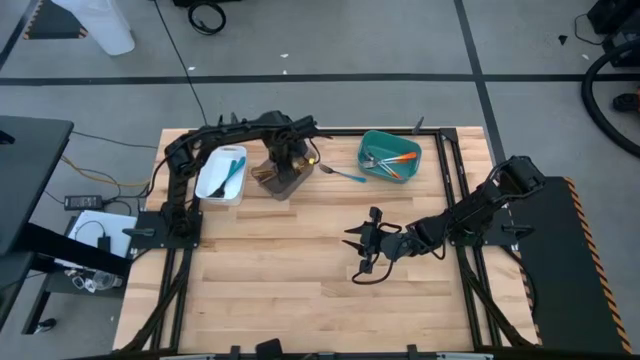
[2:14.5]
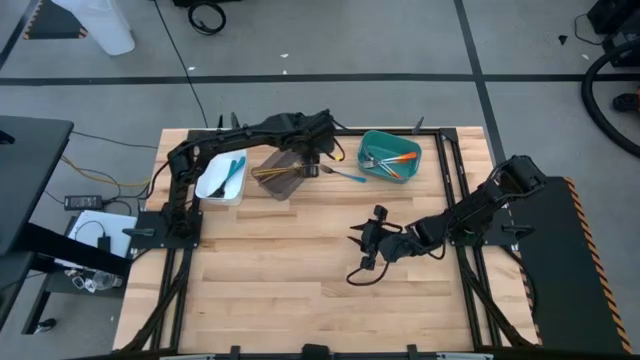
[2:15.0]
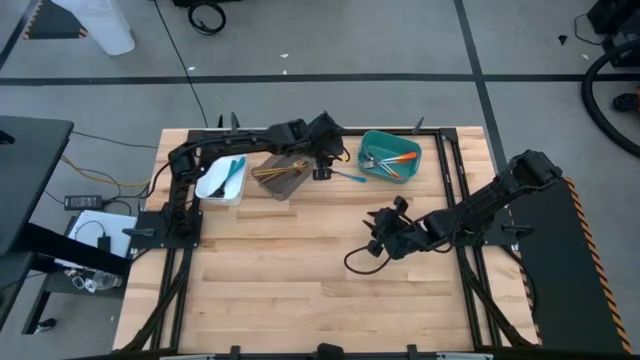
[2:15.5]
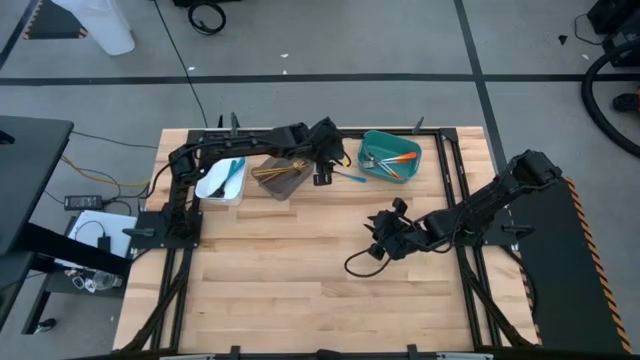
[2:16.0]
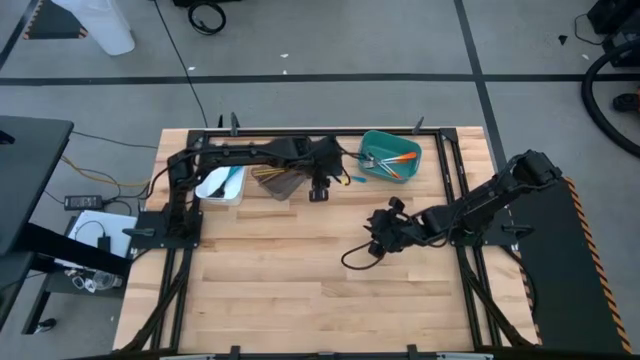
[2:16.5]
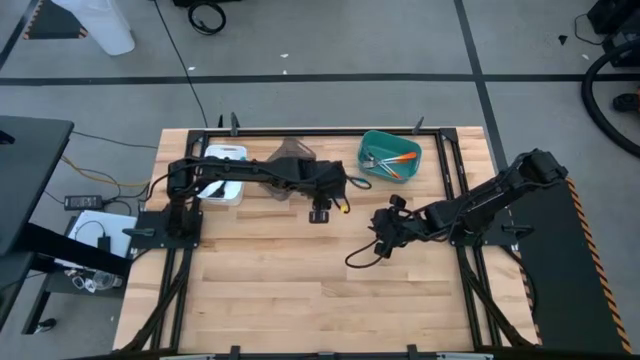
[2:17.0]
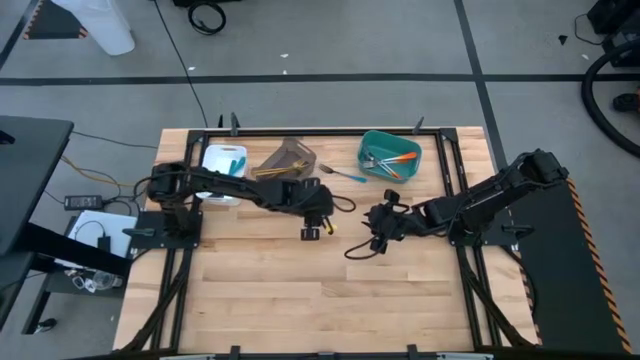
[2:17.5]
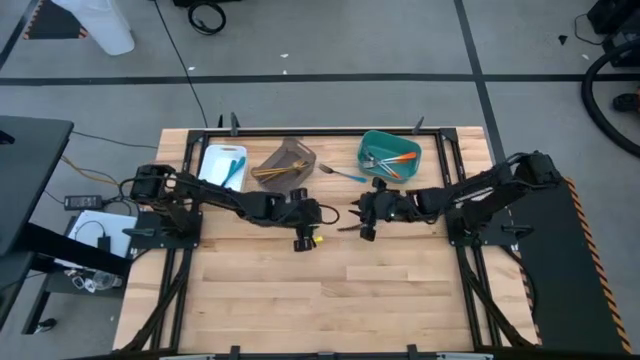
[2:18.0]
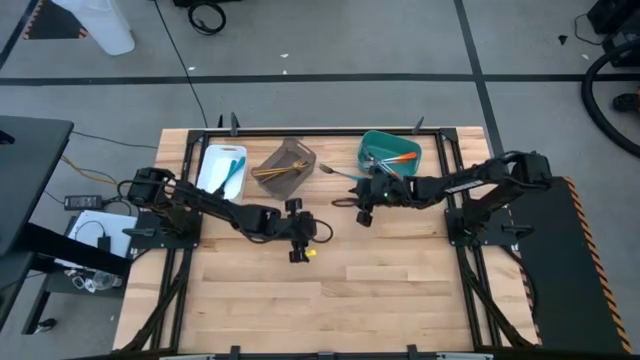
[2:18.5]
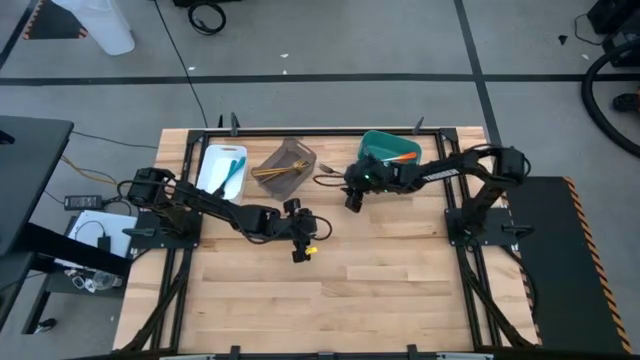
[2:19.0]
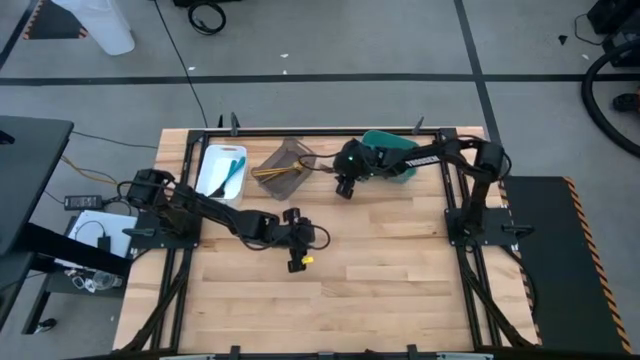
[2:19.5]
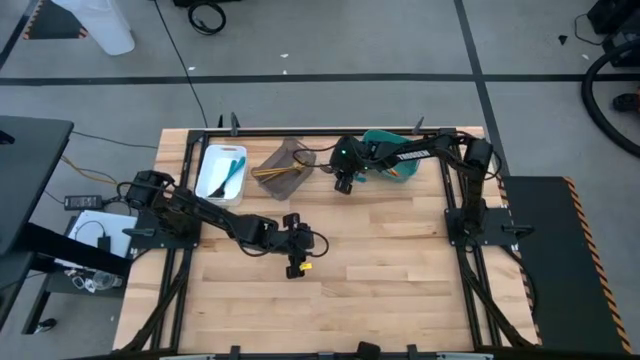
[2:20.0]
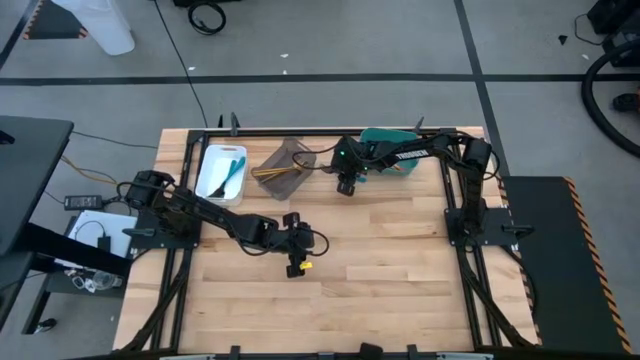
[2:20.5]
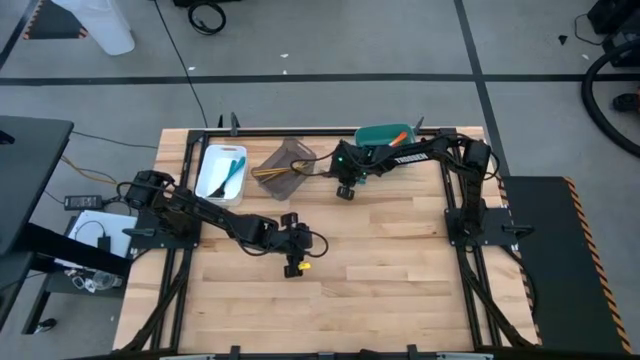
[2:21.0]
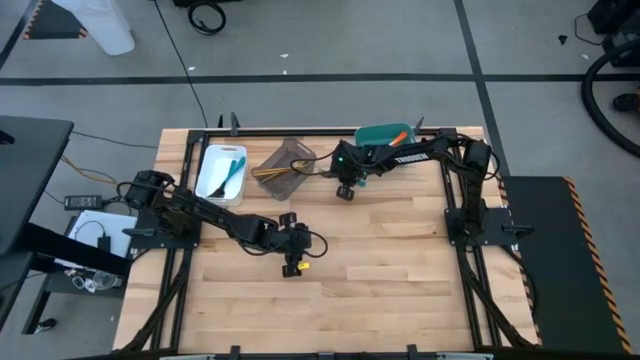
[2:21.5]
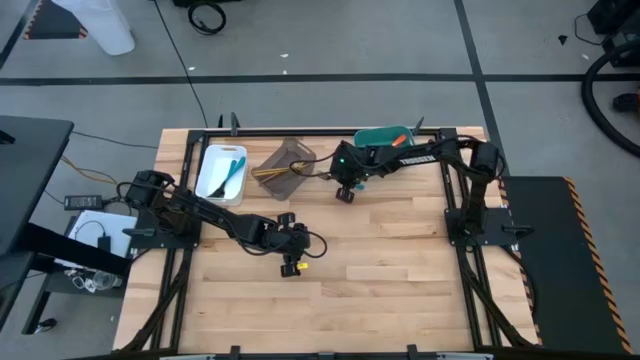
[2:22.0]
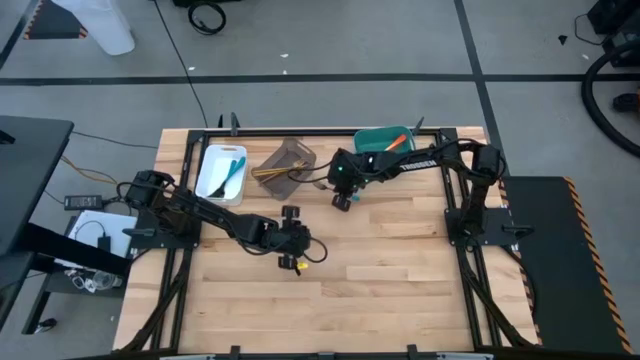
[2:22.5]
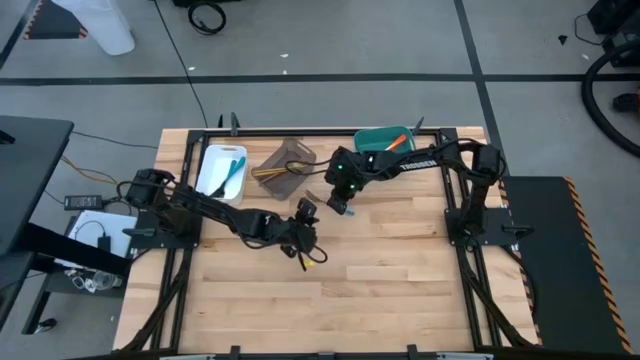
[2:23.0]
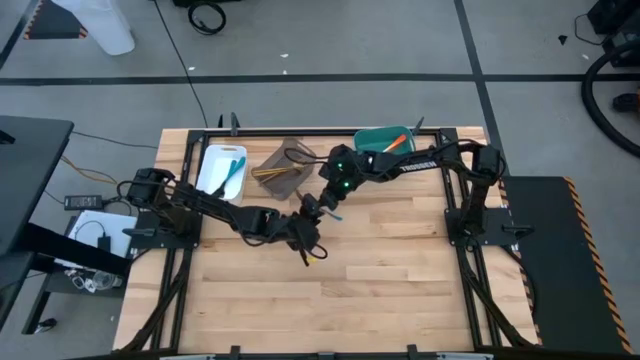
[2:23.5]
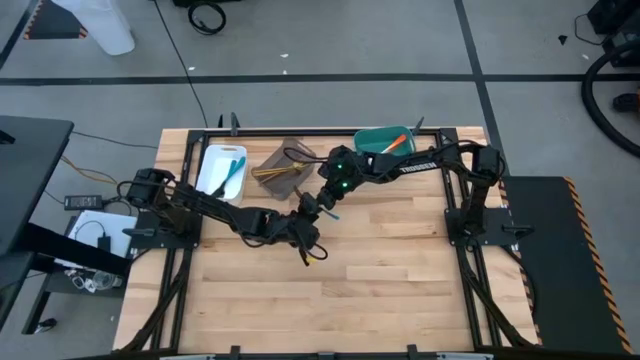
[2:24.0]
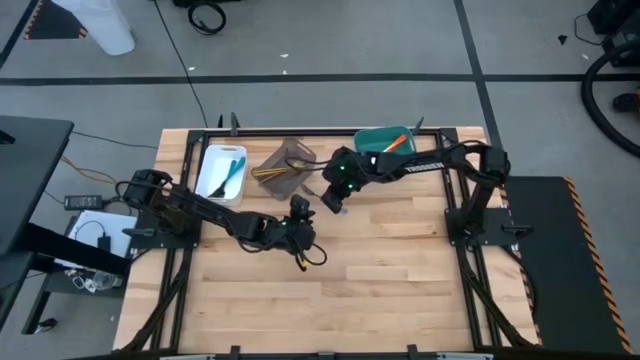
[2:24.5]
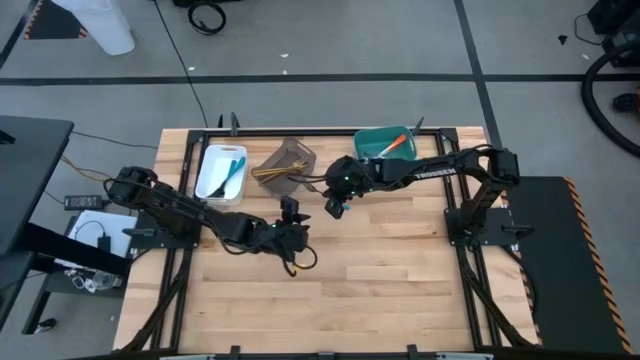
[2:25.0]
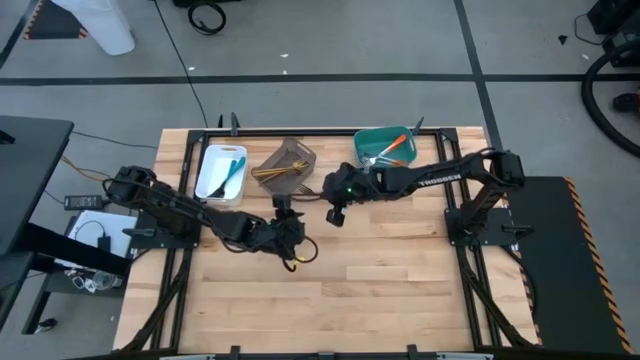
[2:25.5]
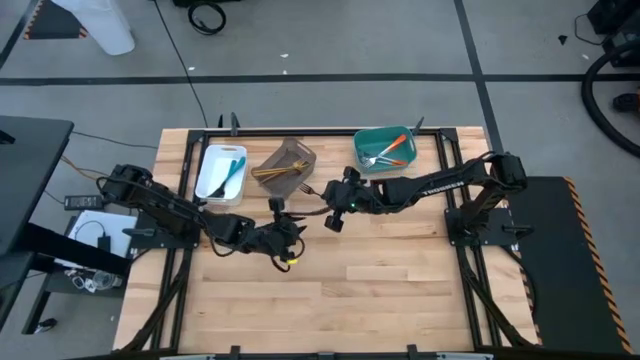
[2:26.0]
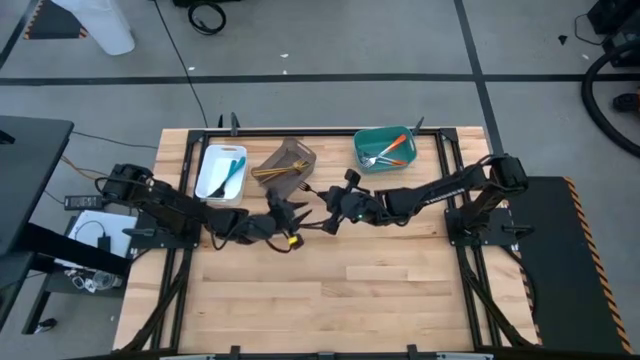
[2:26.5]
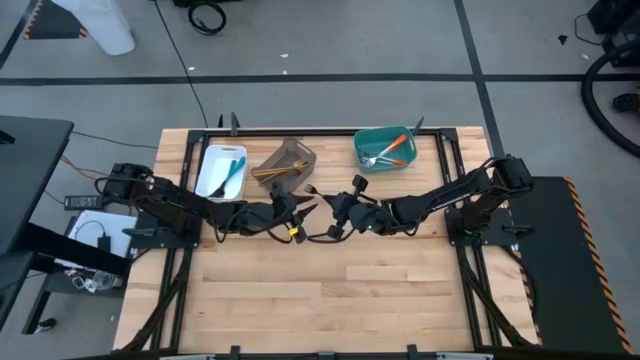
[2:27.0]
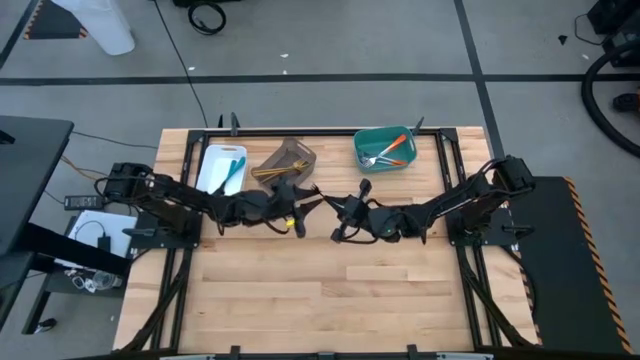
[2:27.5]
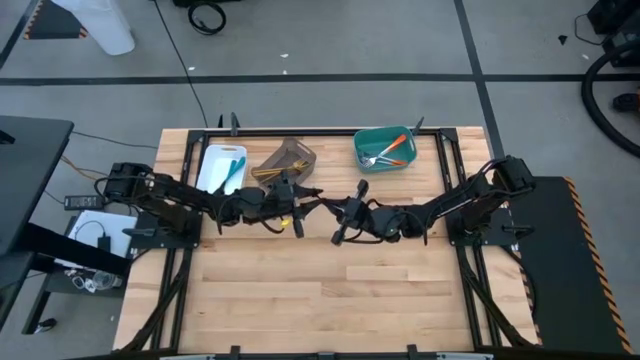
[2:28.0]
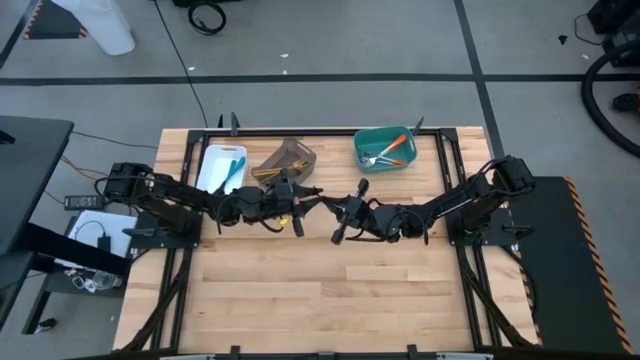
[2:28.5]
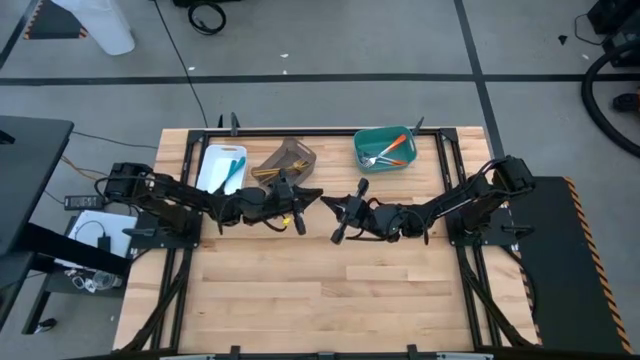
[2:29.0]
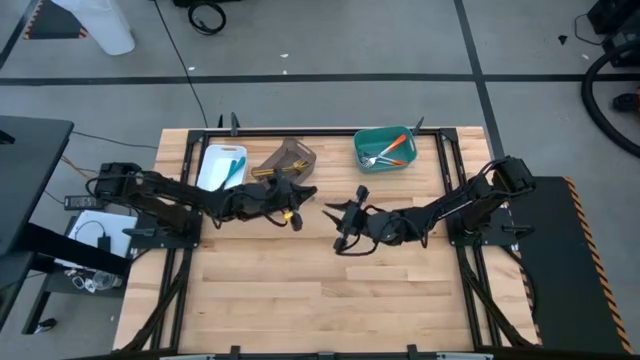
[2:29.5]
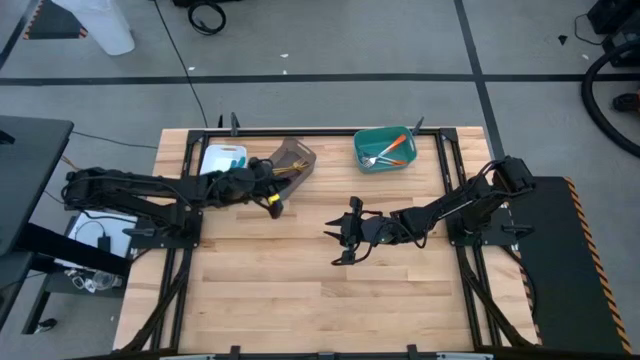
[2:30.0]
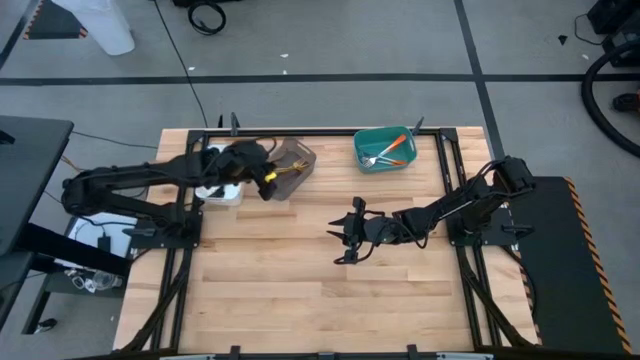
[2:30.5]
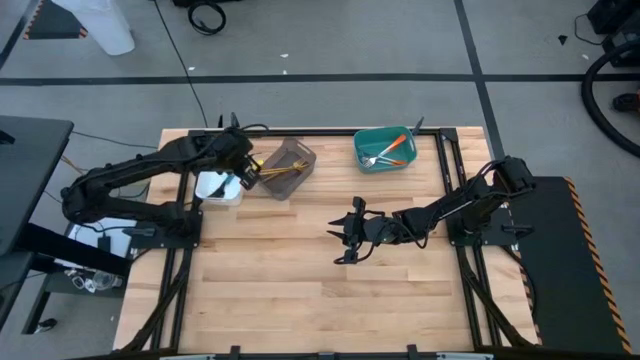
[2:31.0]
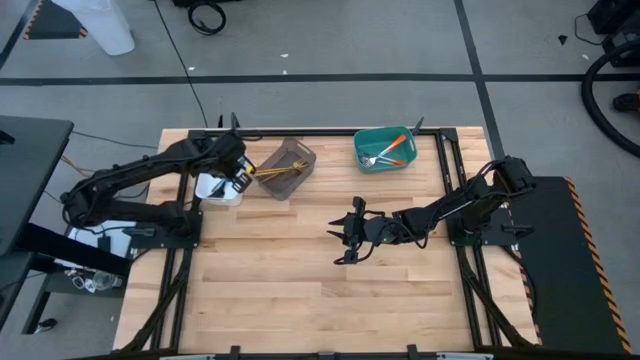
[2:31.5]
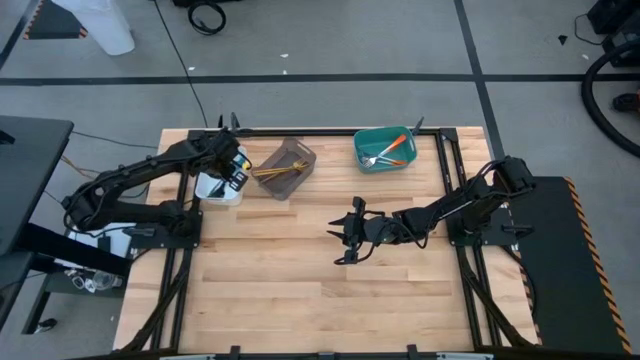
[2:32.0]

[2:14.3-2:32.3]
Task: Sort silverware by color (type)
Put the blue fork into the white bin

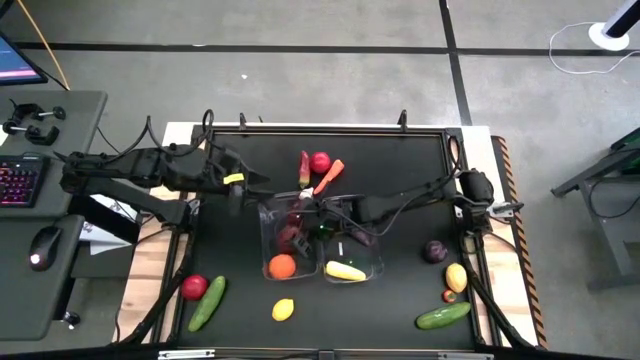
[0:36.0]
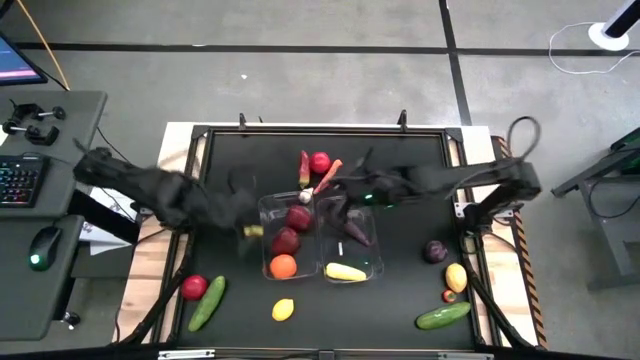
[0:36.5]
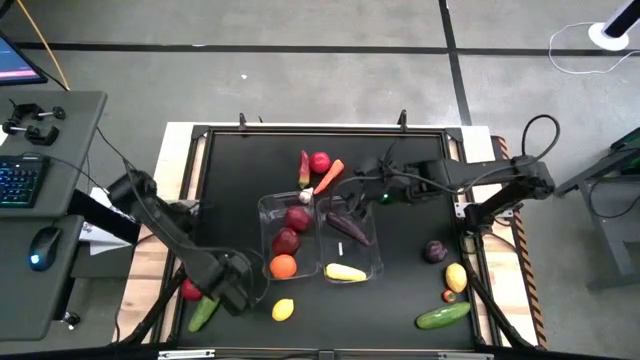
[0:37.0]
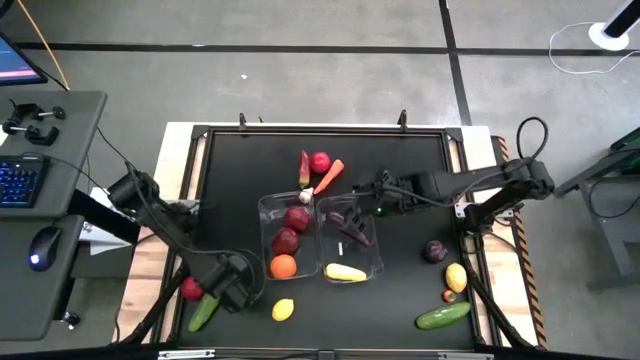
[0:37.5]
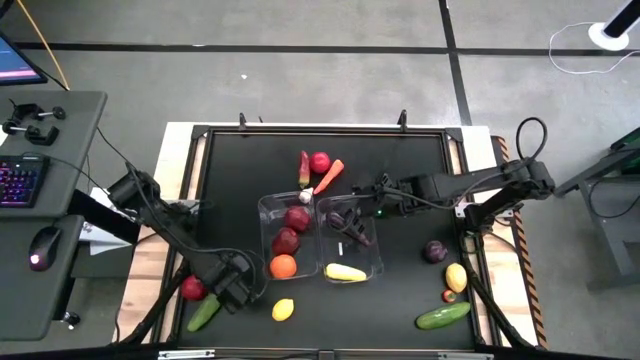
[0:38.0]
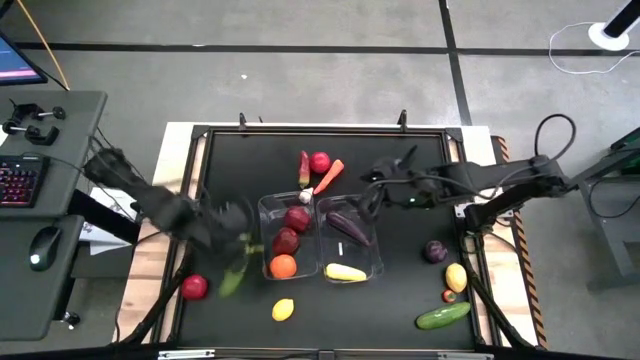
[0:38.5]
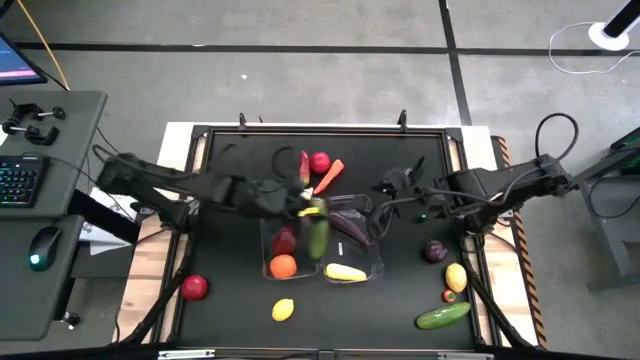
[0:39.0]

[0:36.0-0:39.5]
Task: Sort produce into baskets
Put the left cucumber into the right transparent bin
